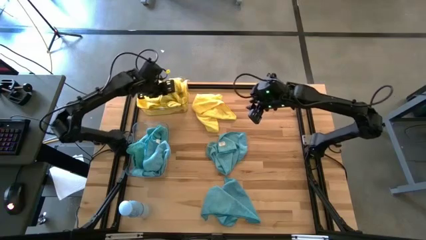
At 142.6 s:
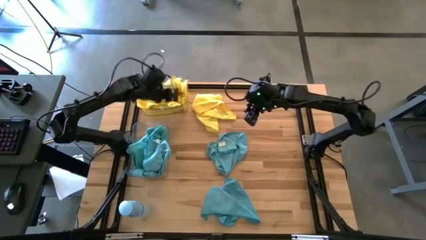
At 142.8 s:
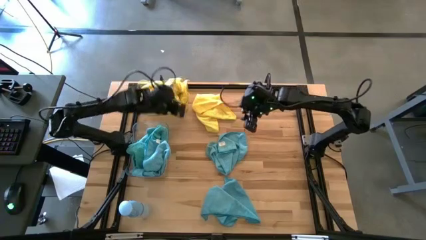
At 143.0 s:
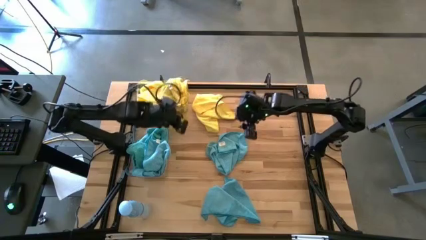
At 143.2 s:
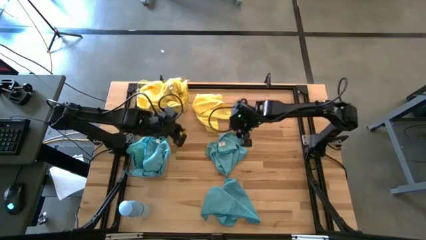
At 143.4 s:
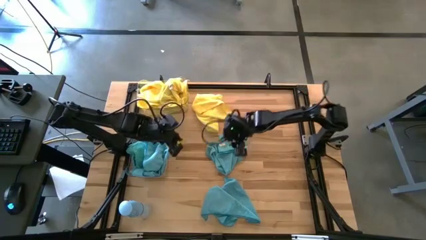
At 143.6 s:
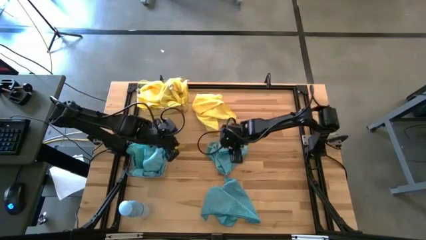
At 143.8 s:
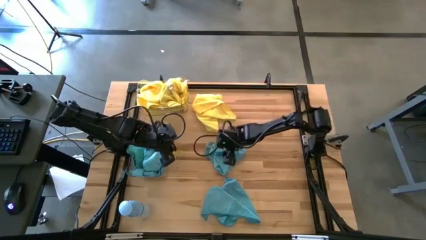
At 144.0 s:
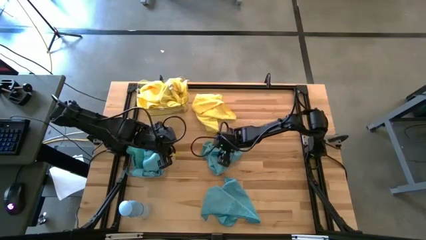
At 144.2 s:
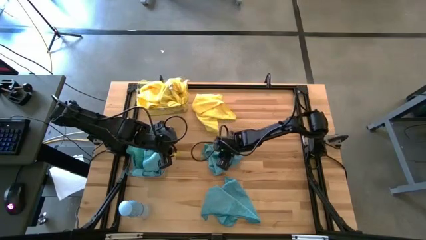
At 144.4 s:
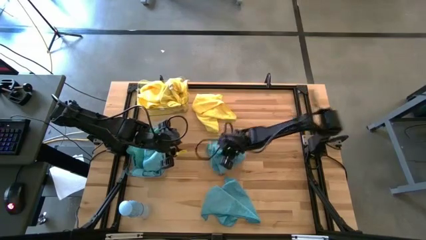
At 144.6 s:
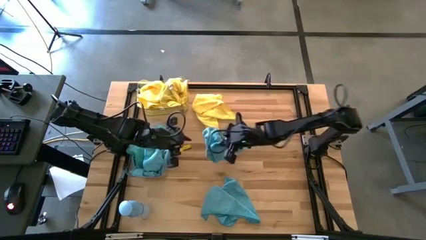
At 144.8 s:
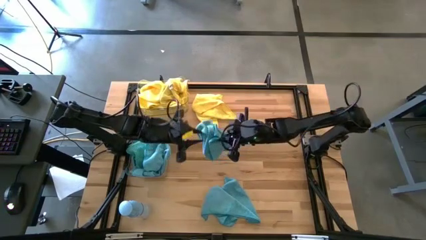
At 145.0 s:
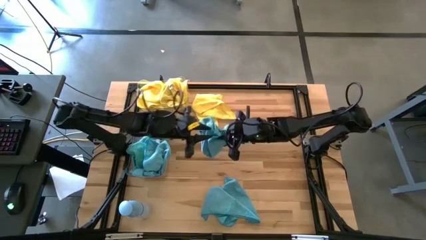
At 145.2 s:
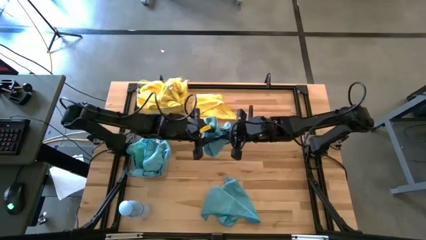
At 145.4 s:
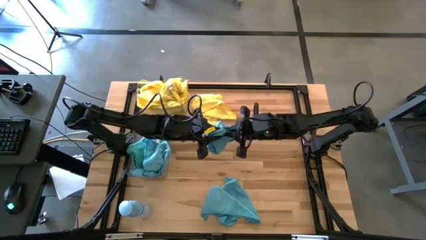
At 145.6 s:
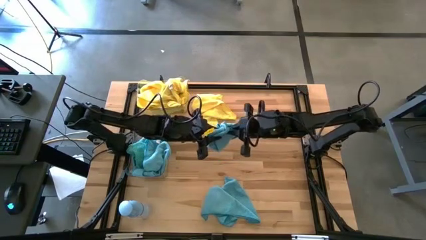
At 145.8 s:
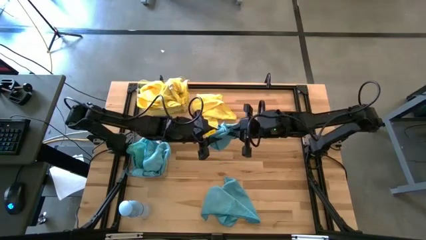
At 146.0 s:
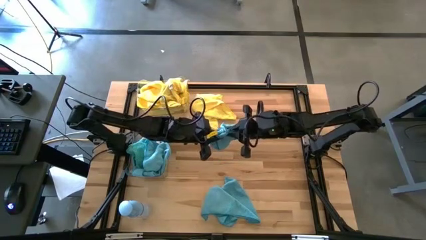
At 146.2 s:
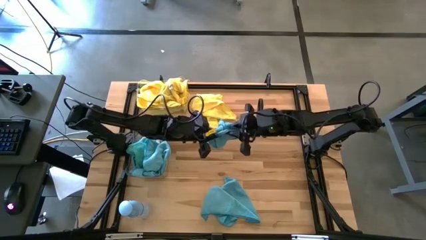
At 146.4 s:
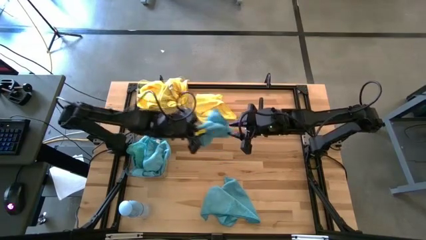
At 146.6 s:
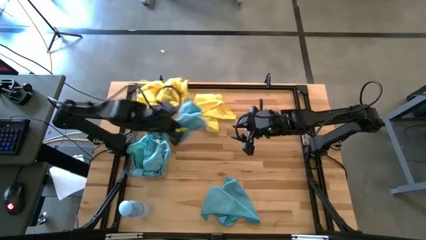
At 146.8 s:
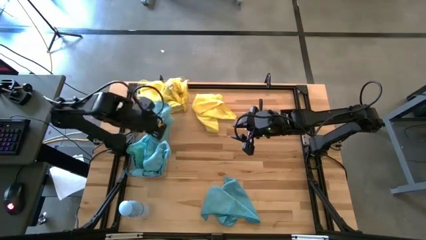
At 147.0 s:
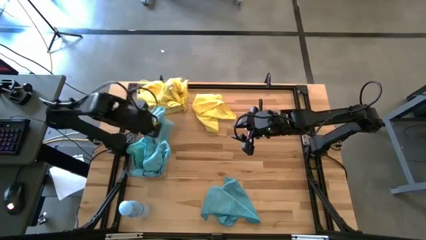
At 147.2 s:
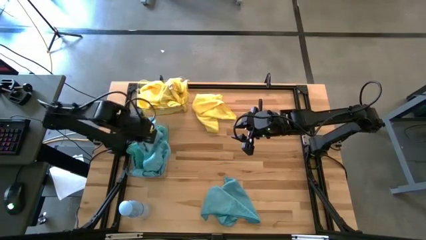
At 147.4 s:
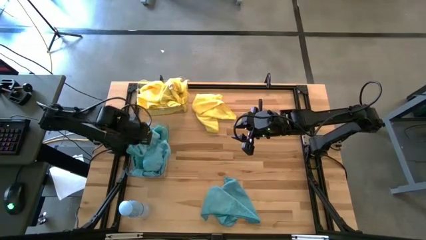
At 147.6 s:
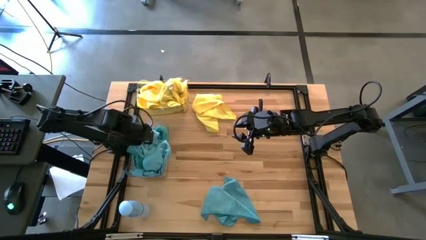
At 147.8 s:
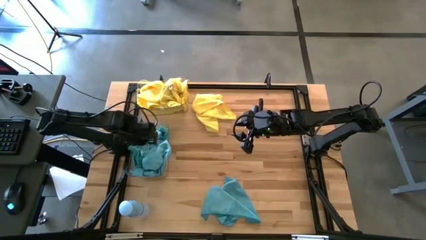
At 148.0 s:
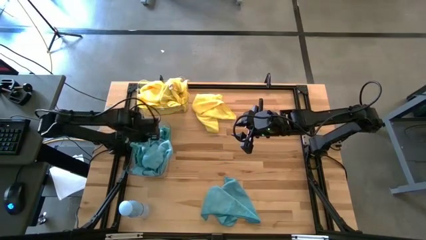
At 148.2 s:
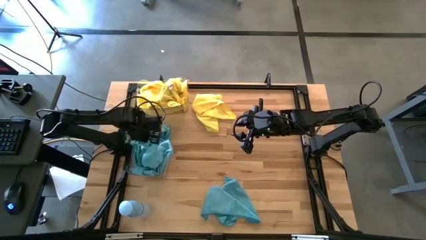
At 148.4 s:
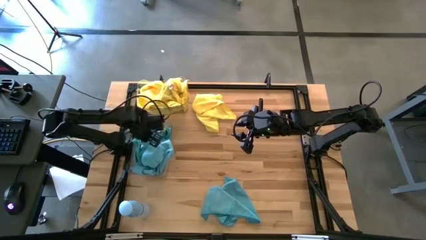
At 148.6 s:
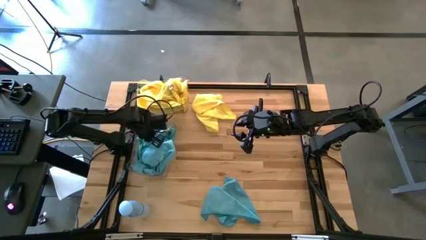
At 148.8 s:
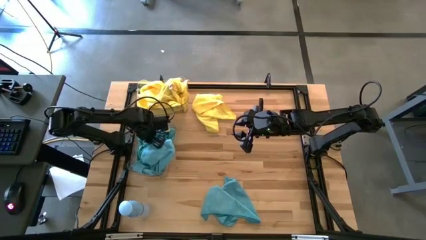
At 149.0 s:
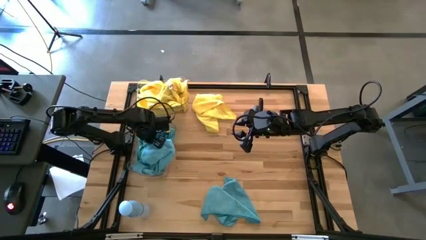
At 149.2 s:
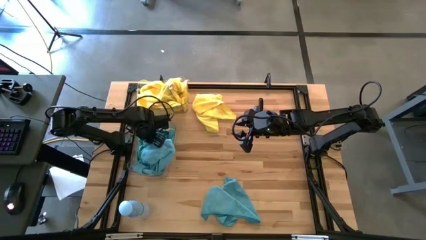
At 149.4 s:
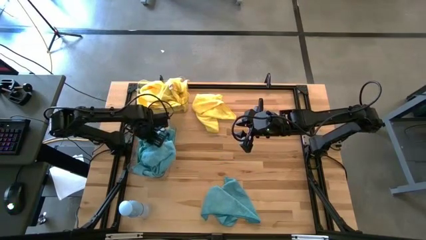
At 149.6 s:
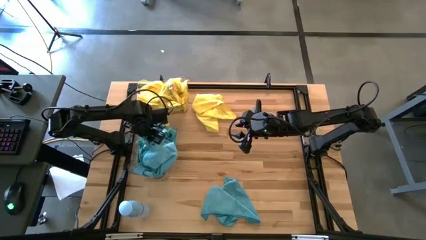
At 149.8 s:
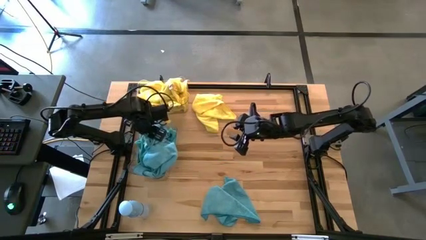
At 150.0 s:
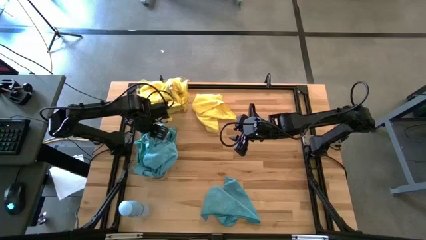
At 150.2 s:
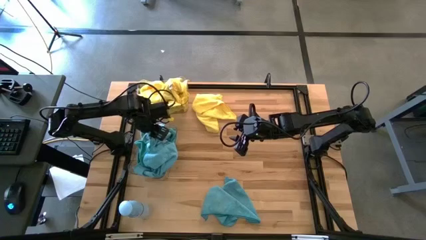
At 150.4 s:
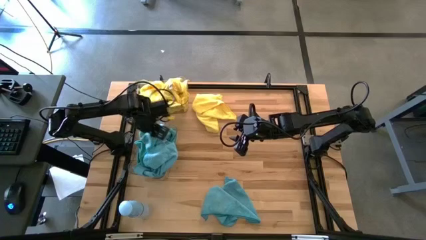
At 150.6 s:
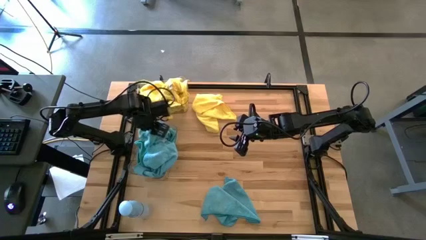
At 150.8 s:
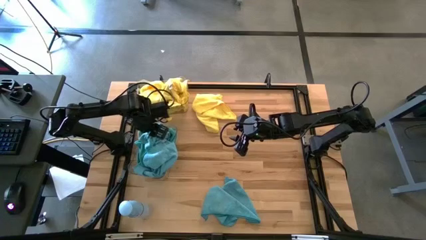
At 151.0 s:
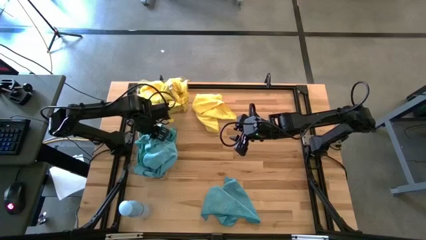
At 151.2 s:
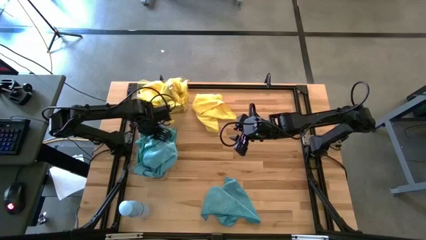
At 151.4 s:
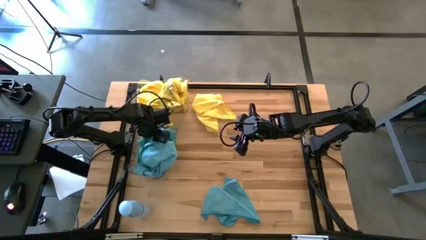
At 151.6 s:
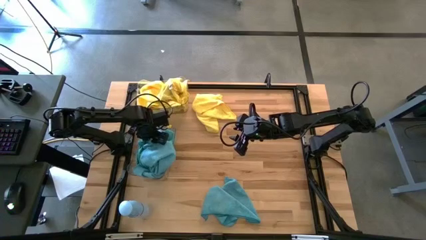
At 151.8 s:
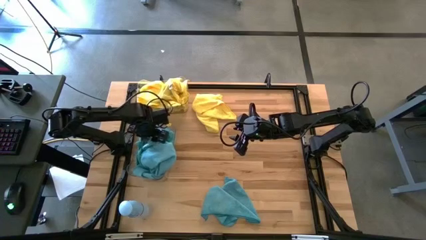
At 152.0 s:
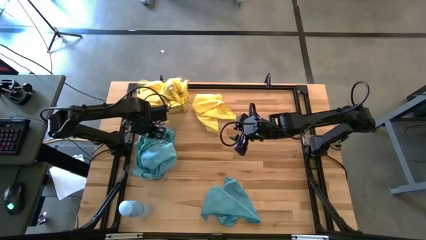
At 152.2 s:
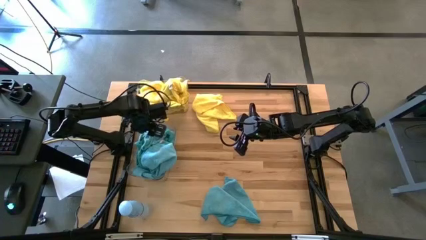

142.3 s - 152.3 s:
Task: Sort microfiber towel by color & place in baskets
Put the blue microfiber cloth into the bottom transparent bin
